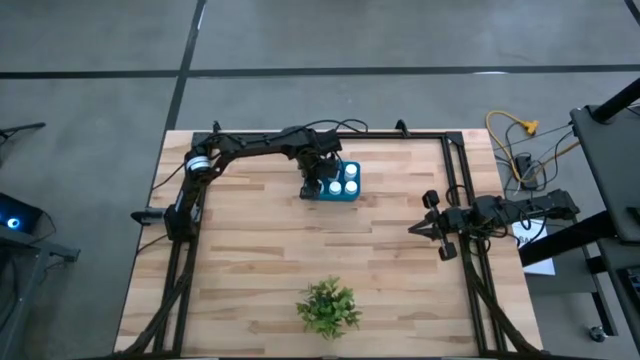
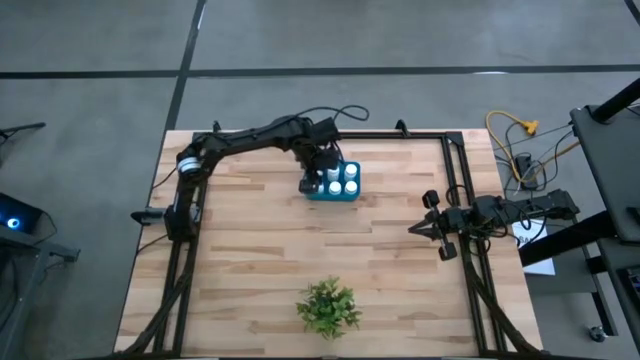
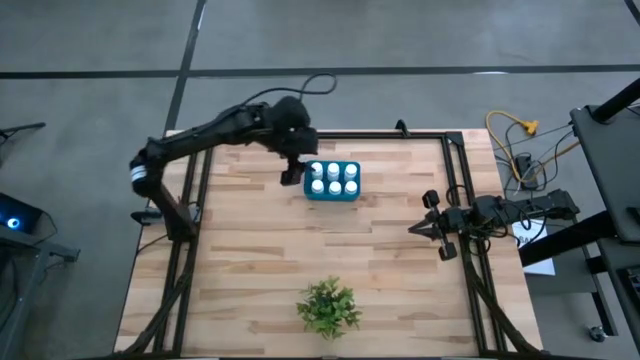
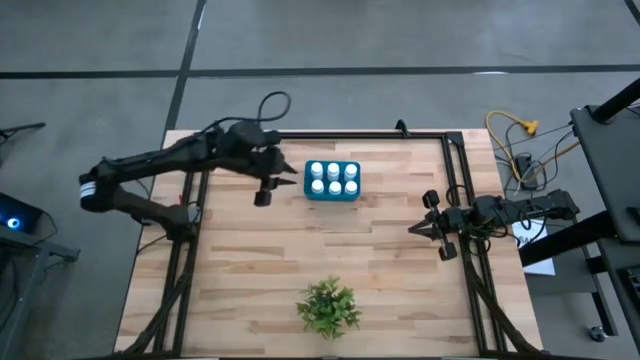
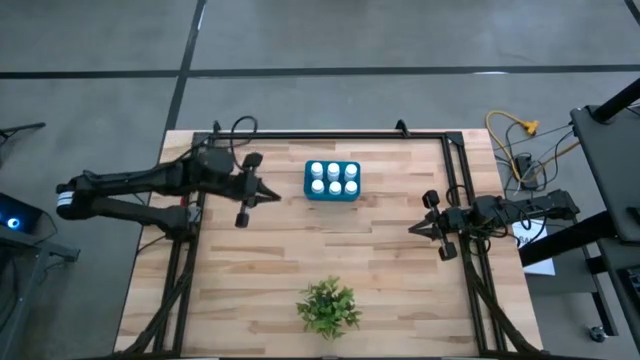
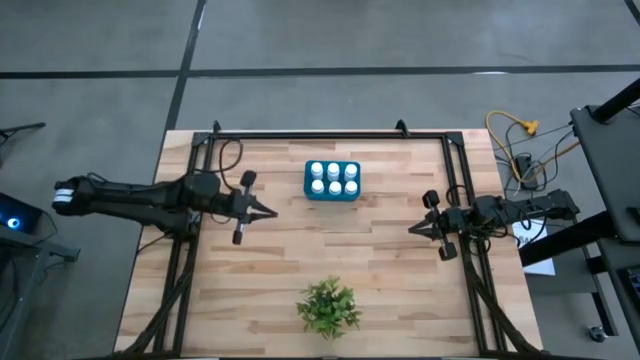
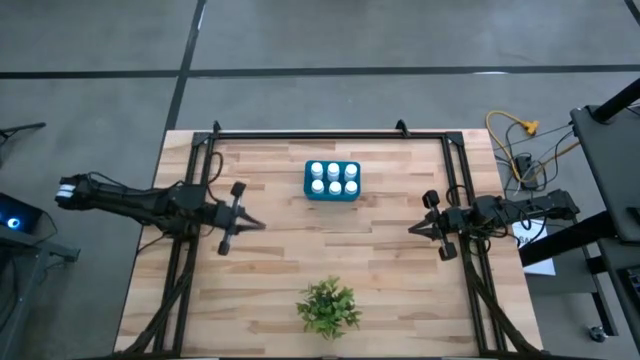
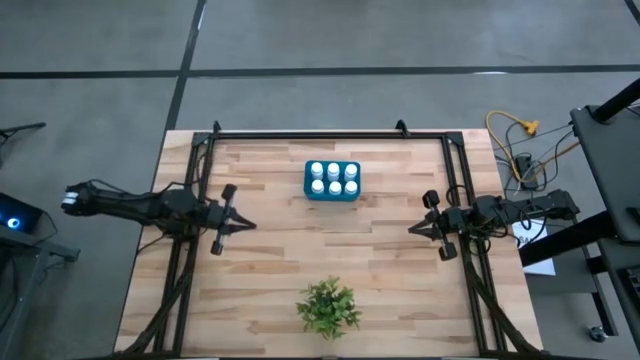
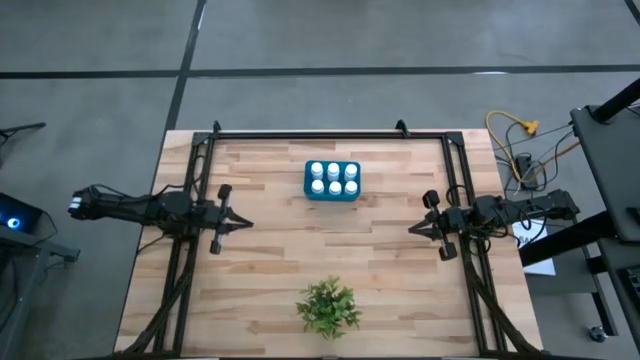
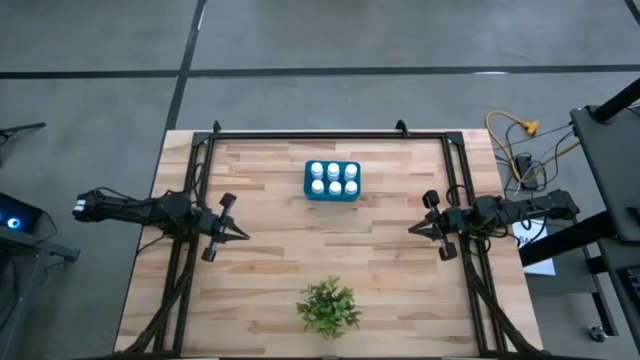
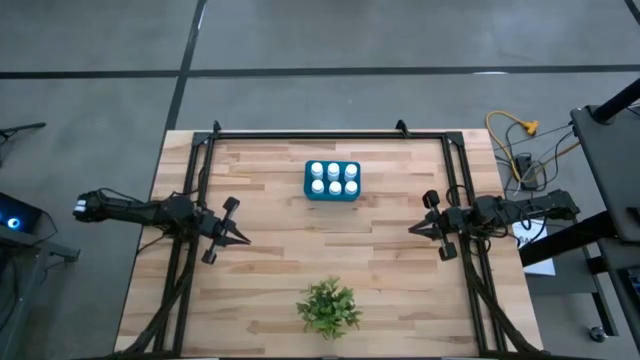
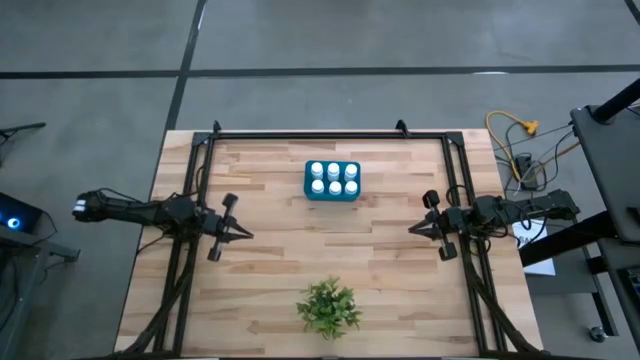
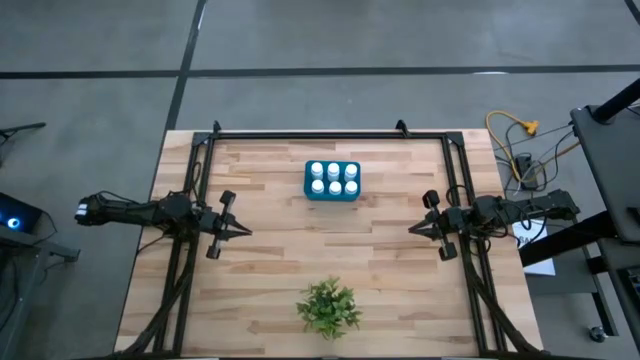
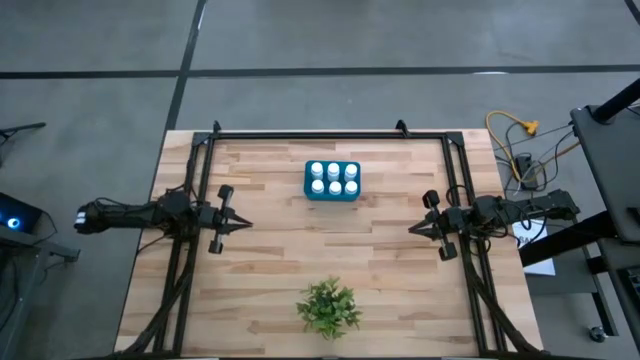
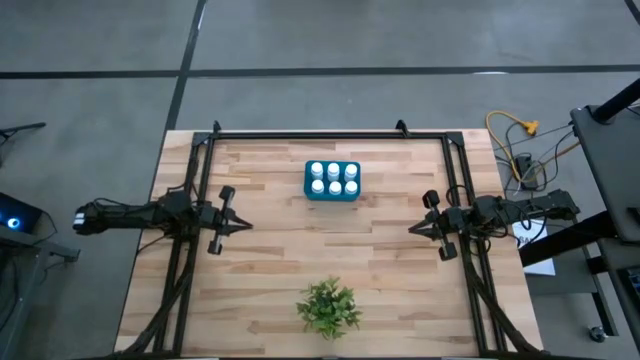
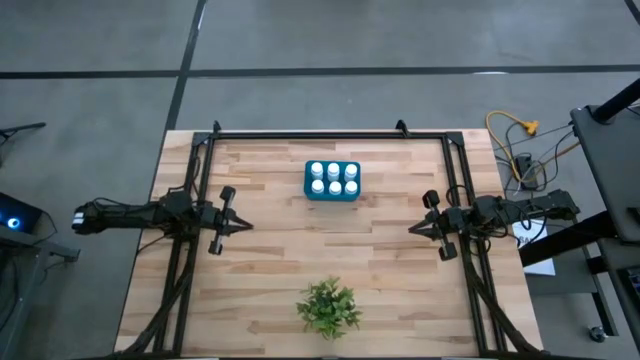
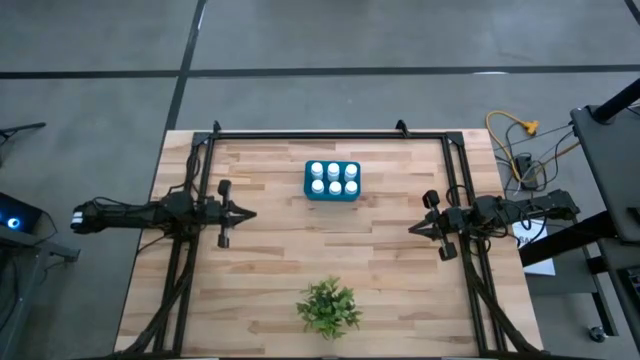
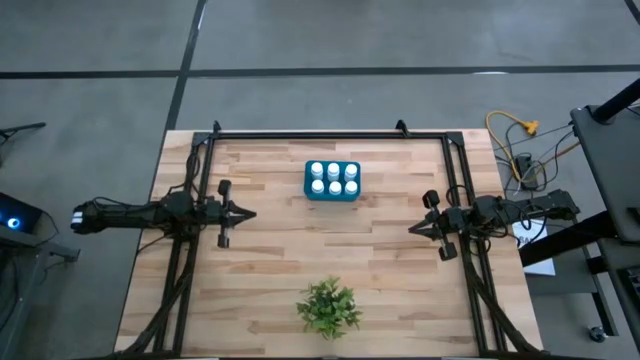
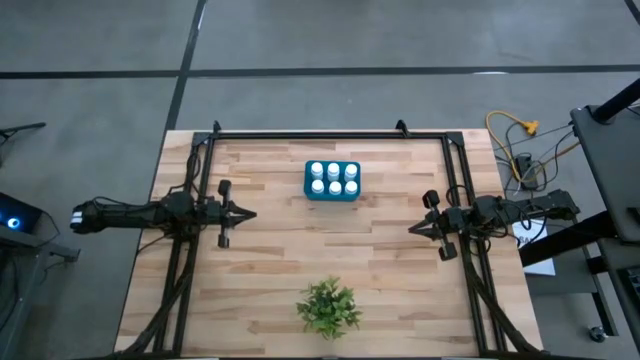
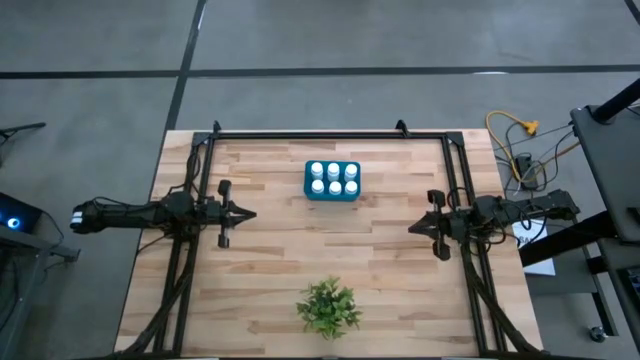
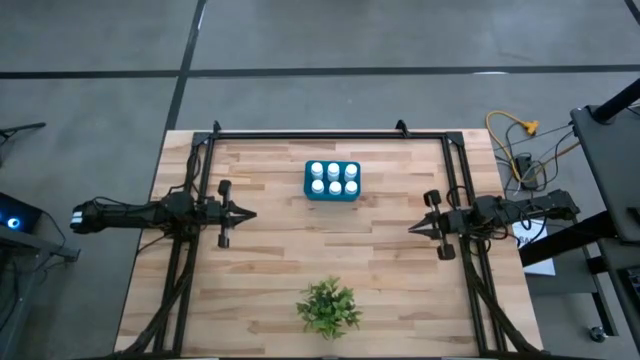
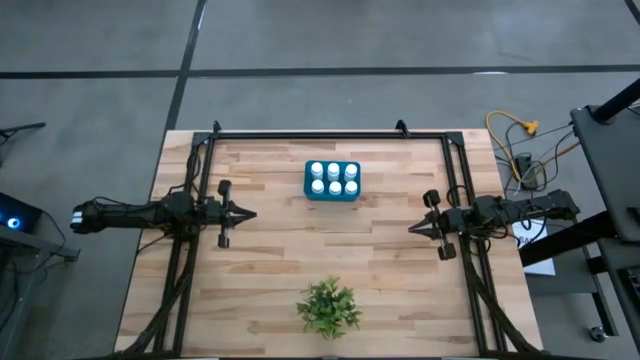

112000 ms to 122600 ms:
Task: Pick and place pill bottles into a basket
Return to Home Position
